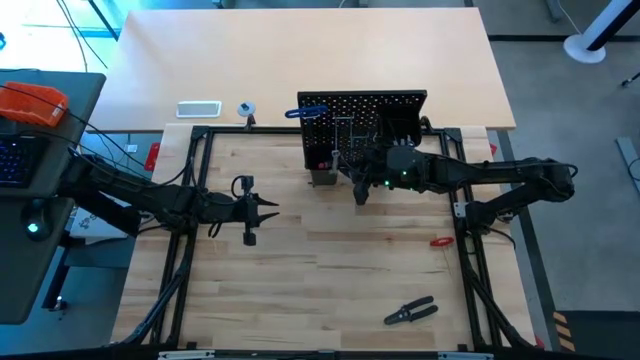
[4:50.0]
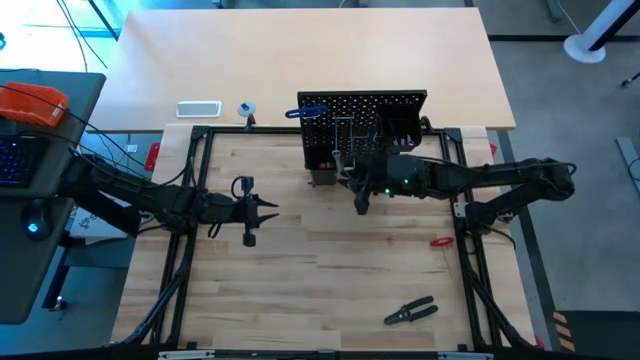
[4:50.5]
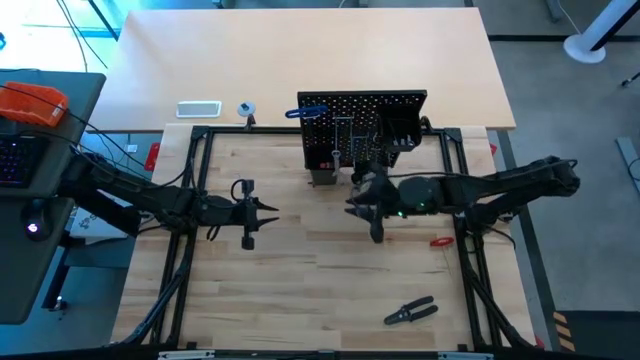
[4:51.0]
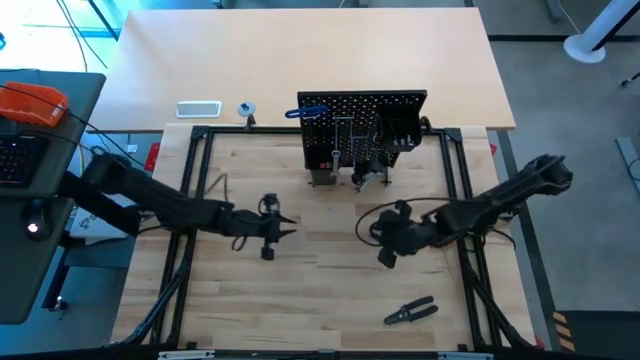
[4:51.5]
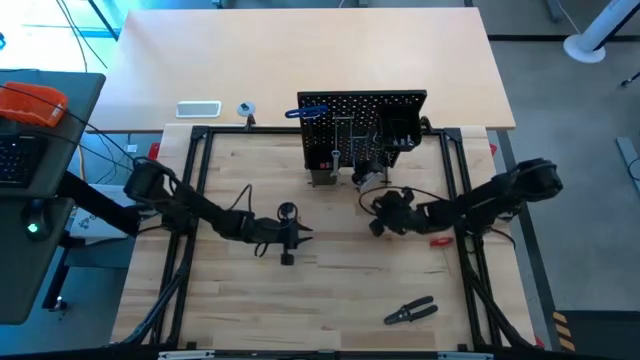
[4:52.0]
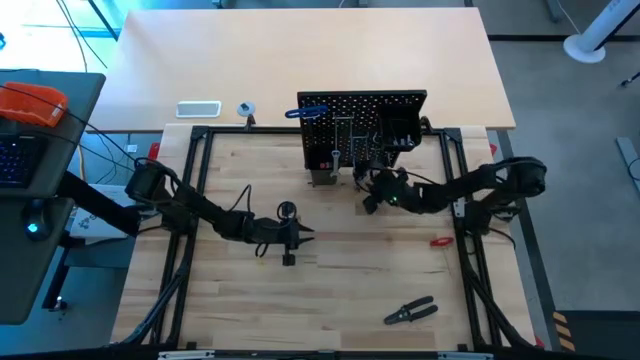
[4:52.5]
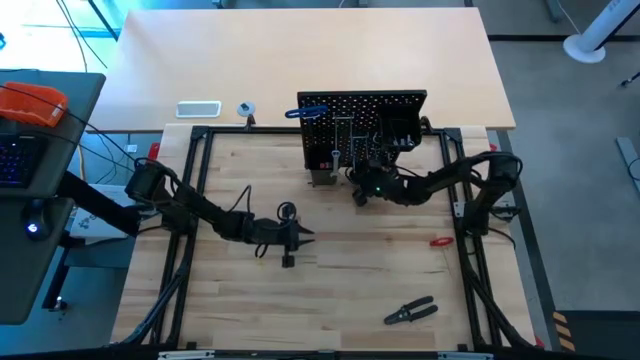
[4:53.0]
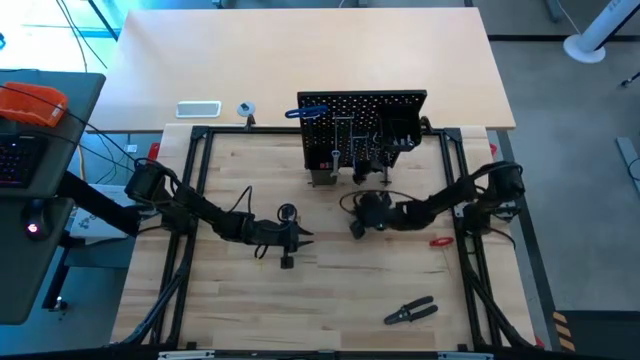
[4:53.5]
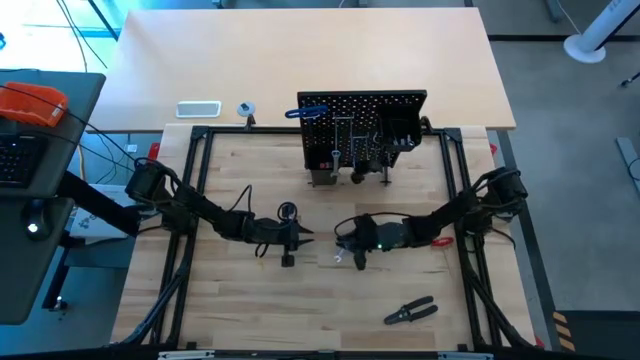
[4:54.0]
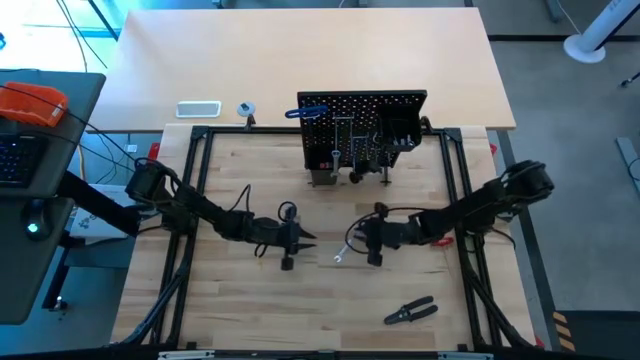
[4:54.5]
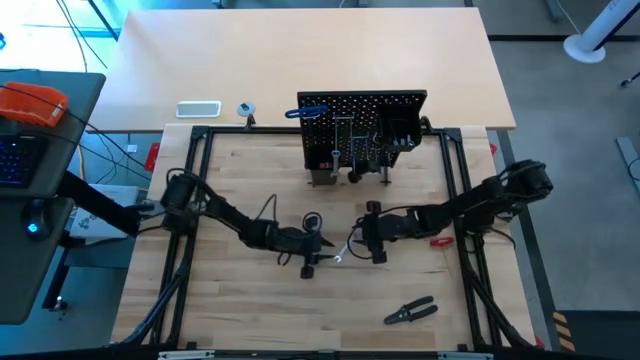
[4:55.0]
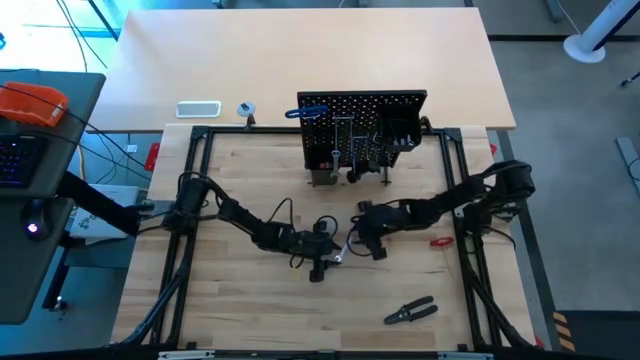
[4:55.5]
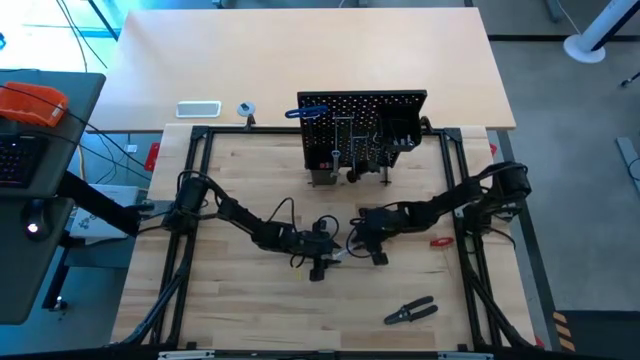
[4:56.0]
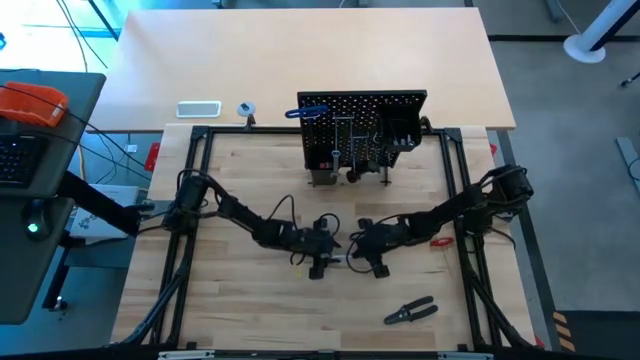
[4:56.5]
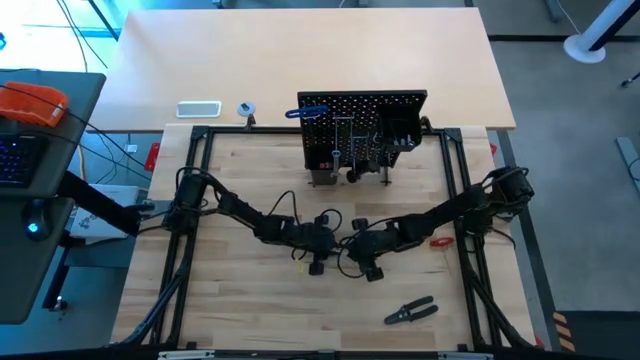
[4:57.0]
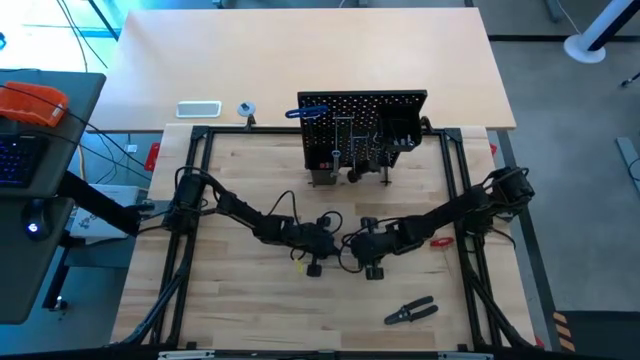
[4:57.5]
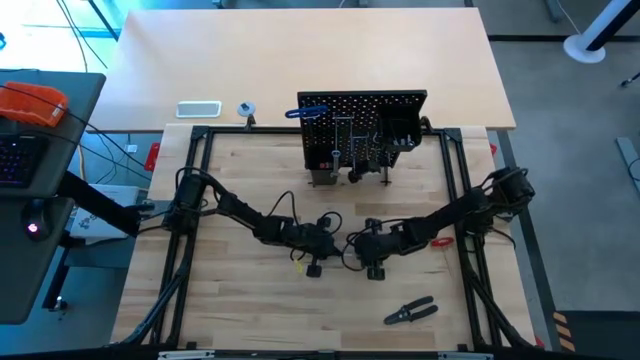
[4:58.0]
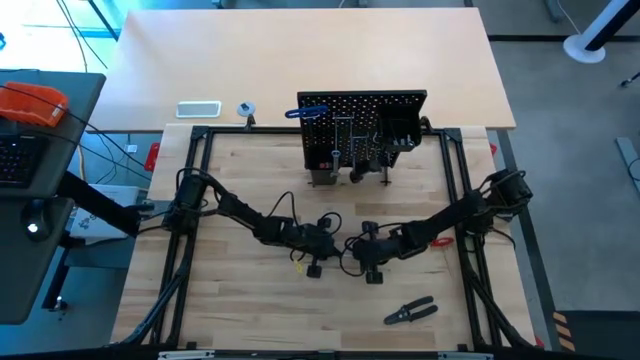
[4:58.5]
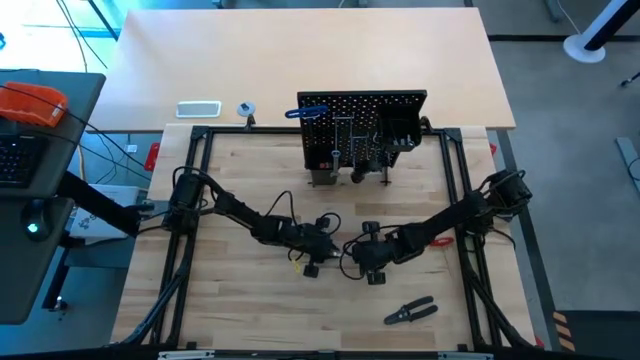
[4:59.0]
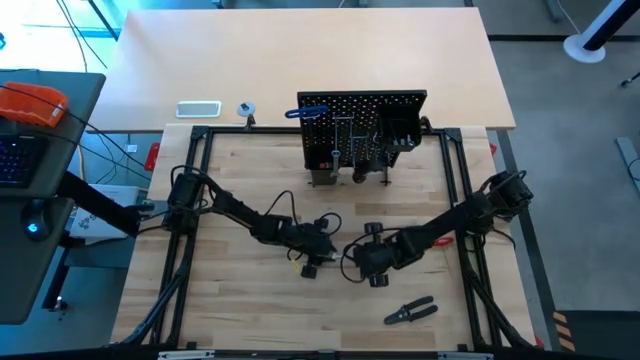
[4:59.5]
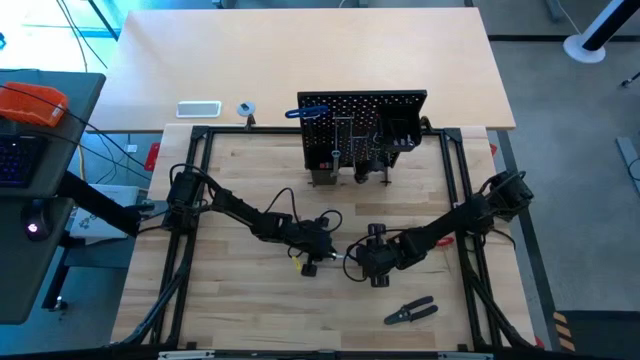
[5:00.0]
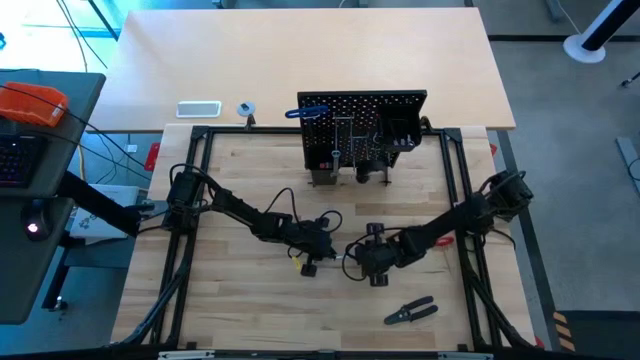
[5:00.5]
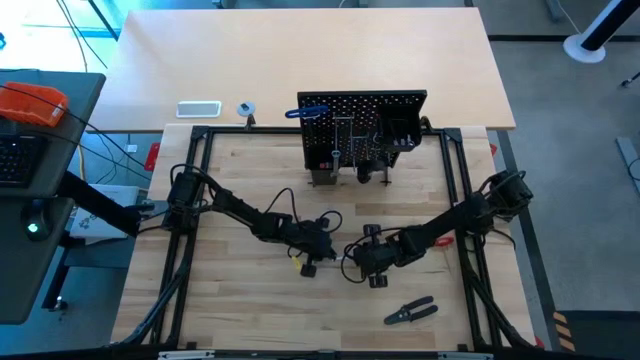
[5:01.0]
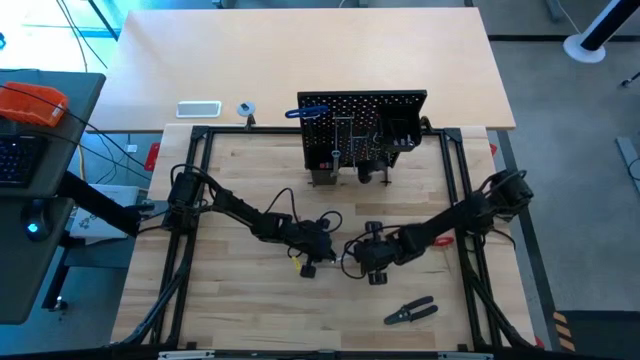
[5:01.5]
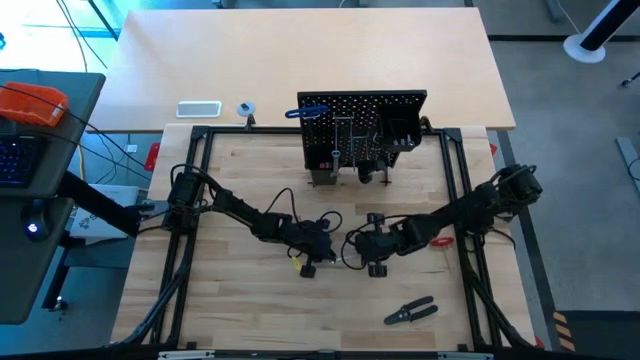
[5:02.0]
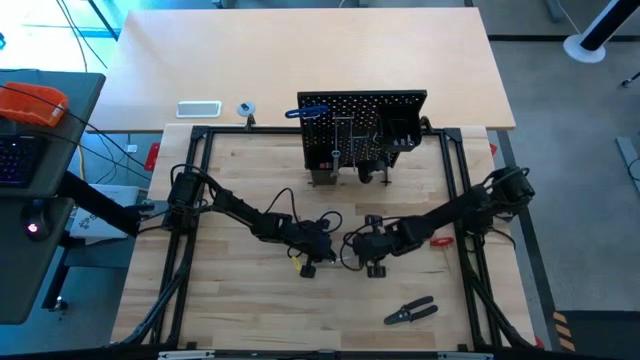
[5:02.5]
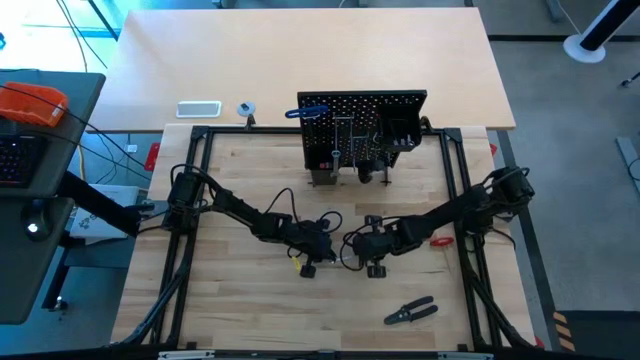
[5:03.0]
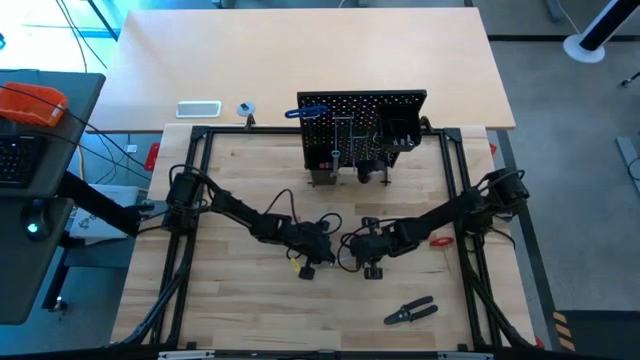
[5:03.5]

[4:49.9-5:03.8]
Task: Hang tools onto peg board
Hang the wrench on the pegboard

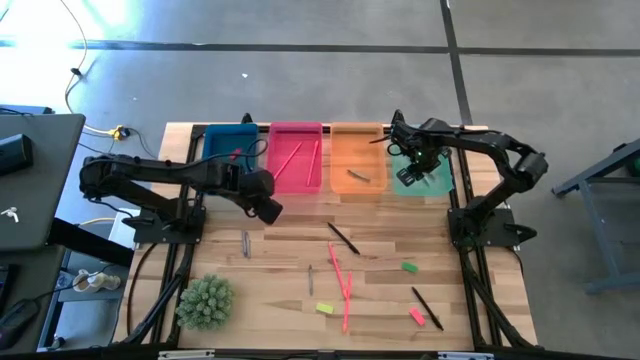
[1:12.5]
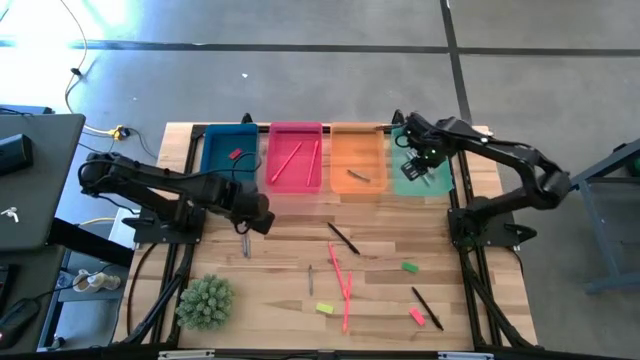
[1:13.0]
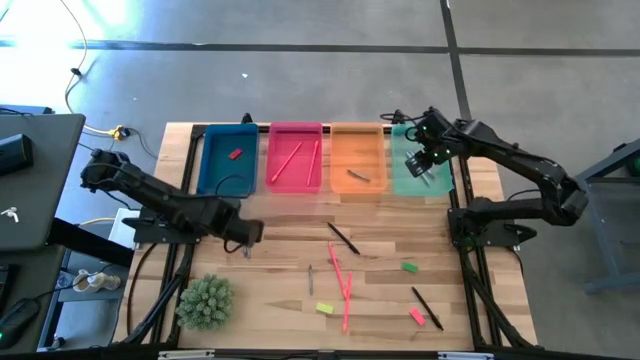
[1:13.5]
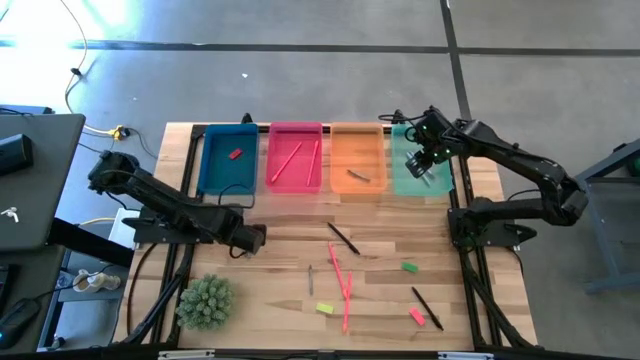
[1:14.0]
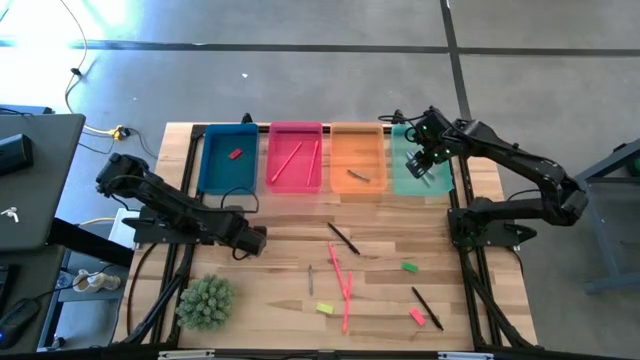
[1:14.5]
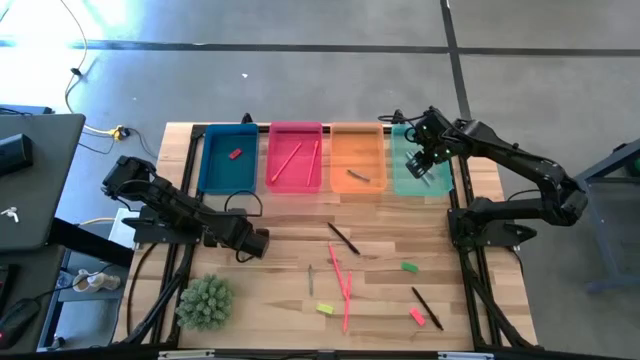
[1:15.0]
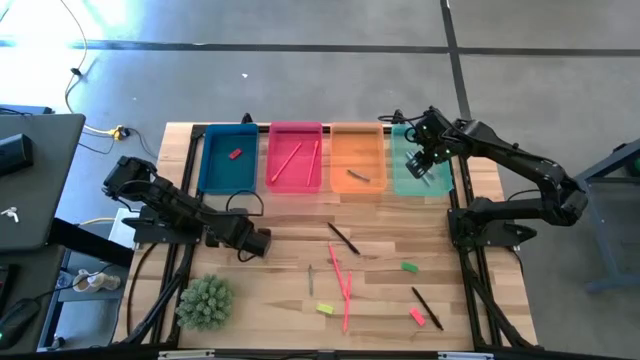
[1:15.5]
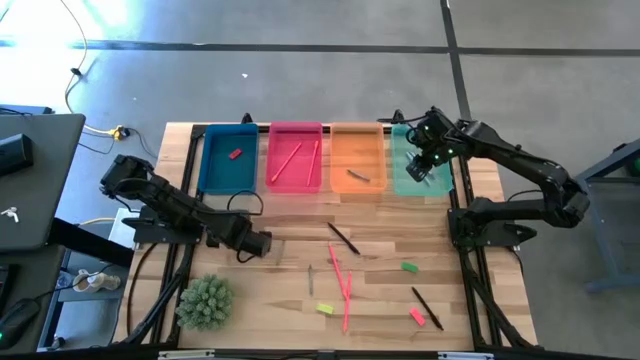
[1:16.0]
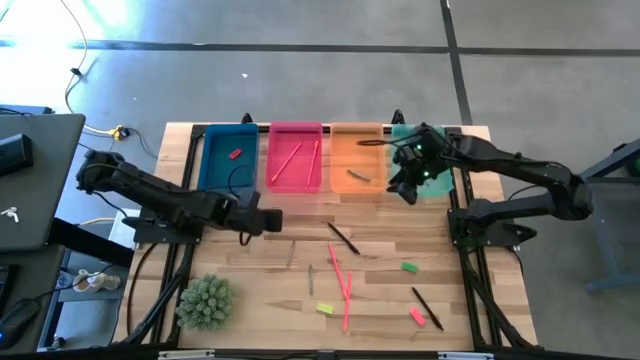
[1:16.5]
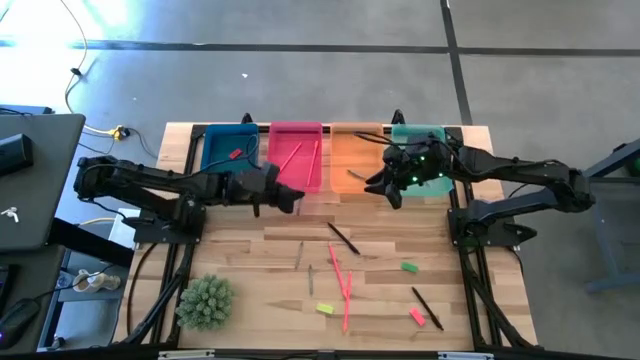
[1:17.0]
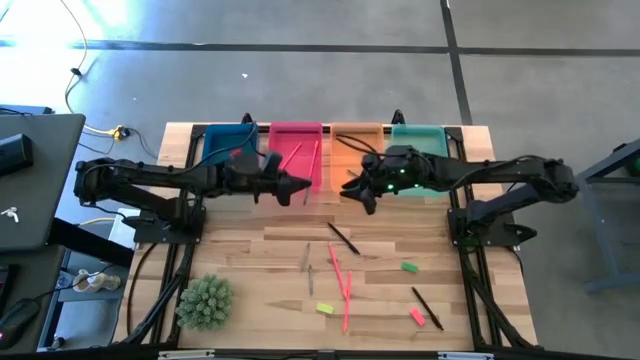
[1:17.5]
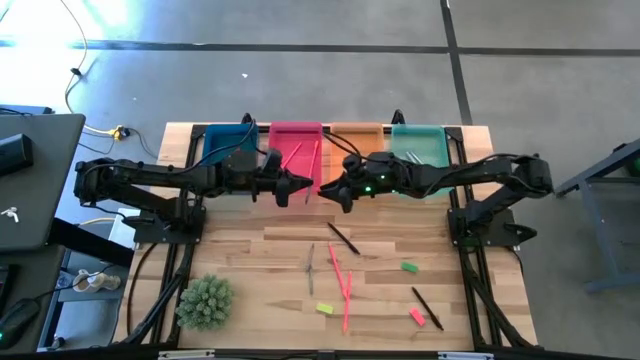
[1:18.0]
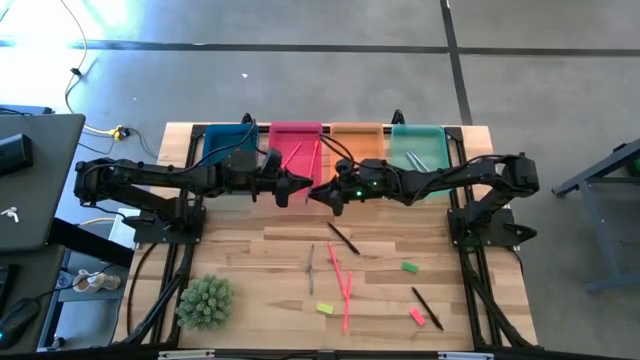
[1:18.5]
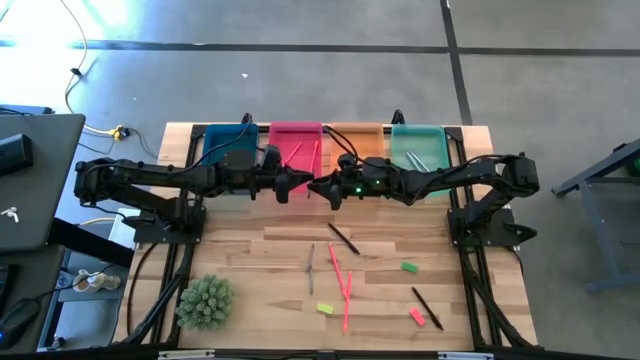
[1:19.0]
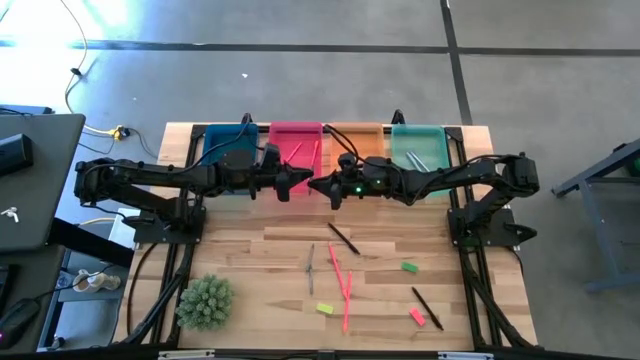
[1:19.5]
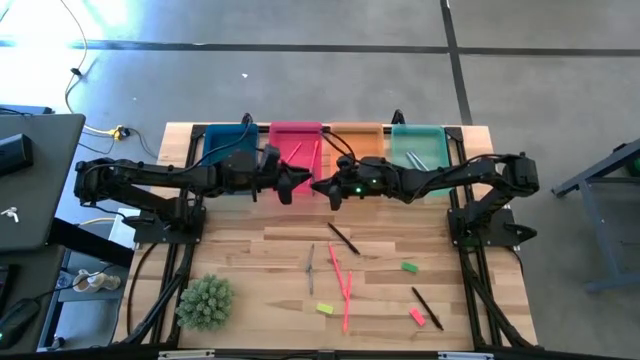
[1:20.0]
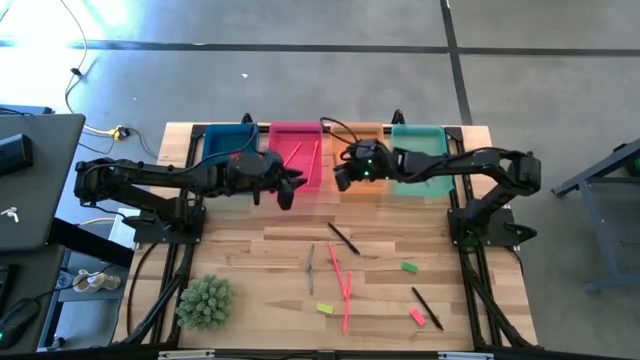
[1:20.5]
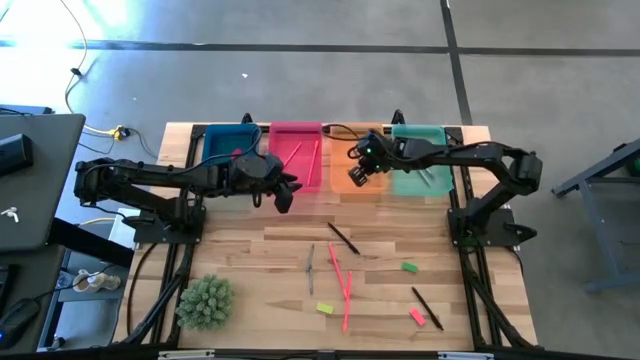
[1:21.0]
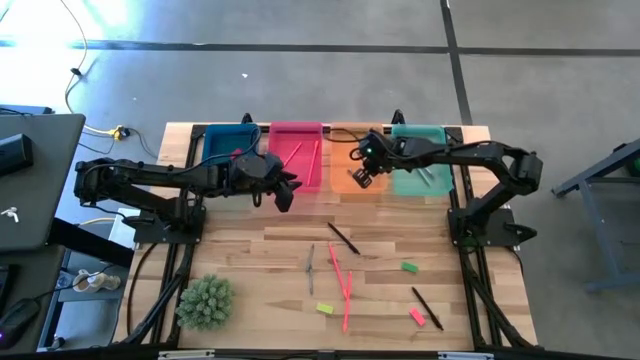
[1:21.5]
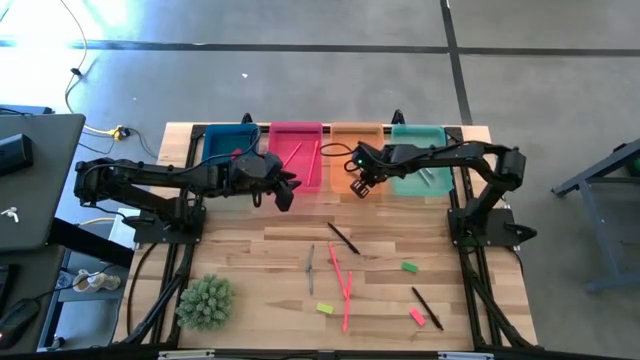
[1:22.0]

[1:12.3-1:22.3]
Task: Sort crayons/erasers/pens/pencils in bins
Put the gray crayon into the orange bin
